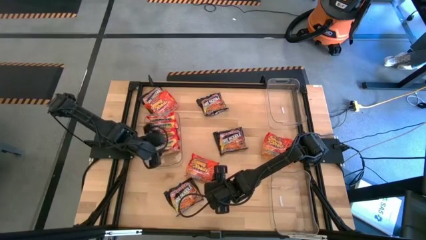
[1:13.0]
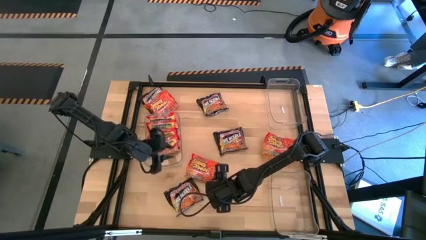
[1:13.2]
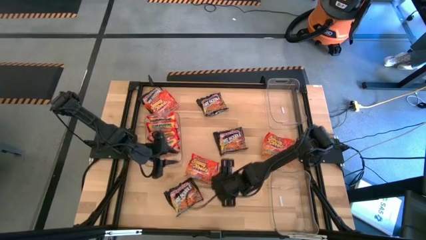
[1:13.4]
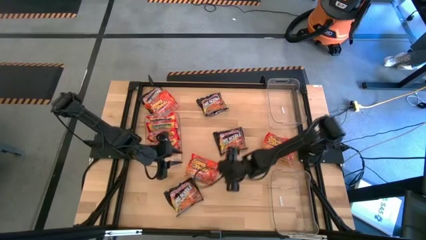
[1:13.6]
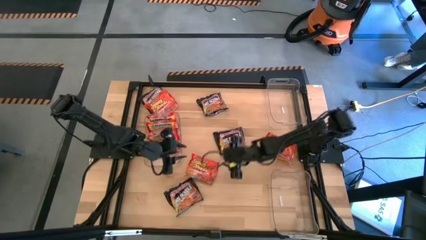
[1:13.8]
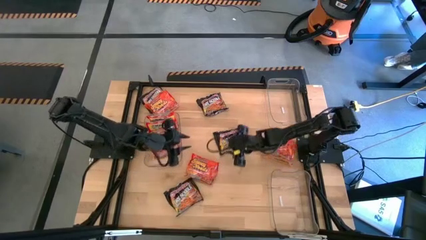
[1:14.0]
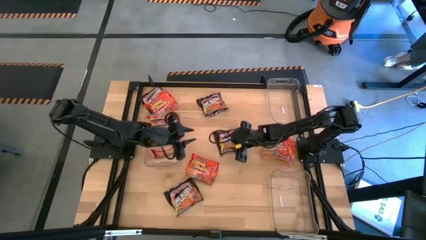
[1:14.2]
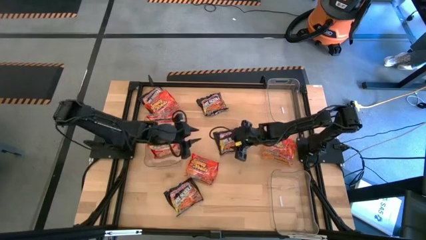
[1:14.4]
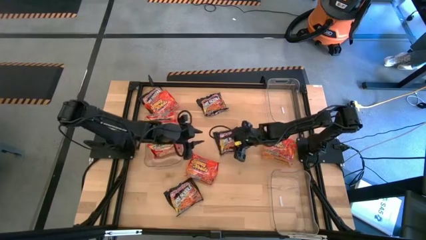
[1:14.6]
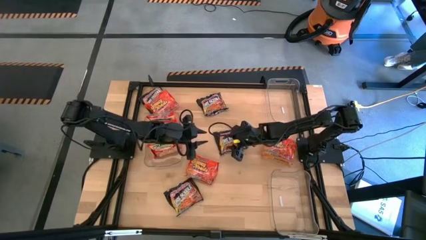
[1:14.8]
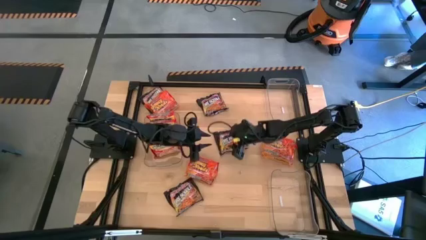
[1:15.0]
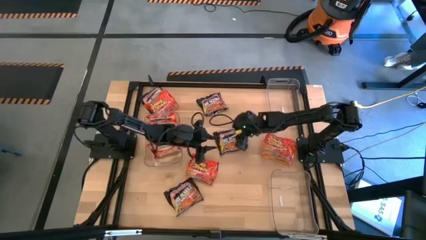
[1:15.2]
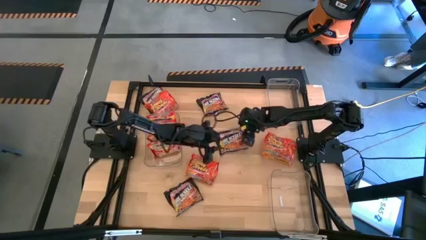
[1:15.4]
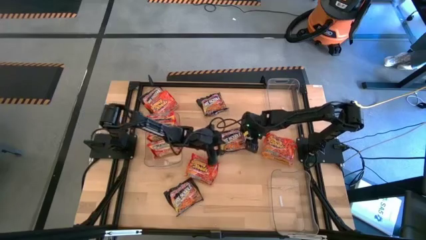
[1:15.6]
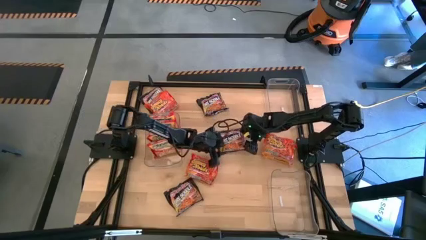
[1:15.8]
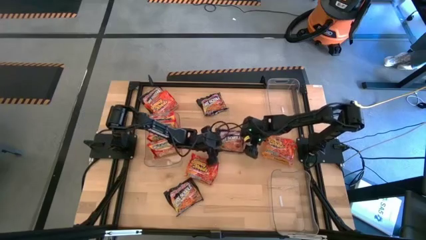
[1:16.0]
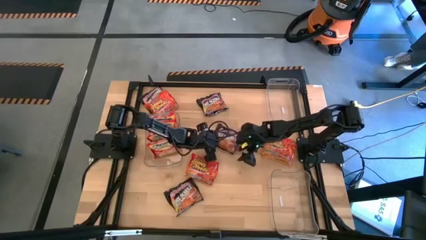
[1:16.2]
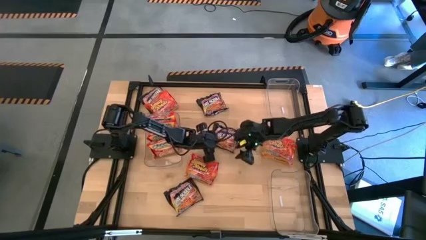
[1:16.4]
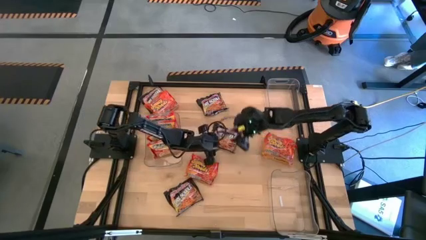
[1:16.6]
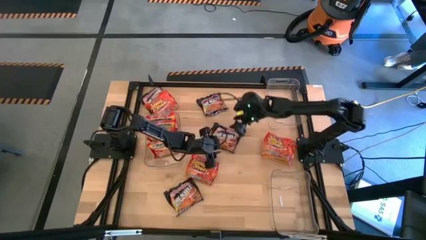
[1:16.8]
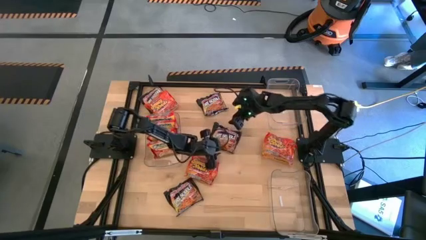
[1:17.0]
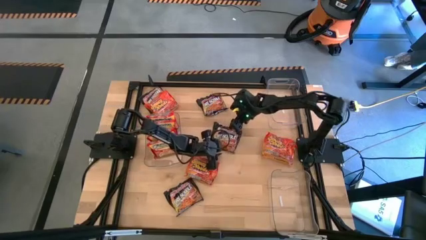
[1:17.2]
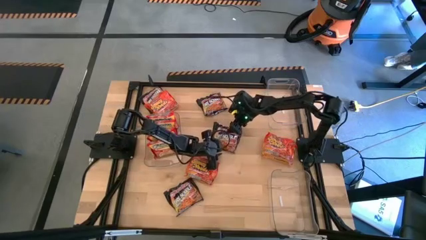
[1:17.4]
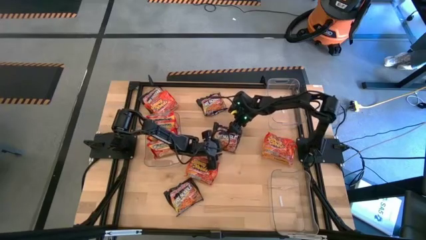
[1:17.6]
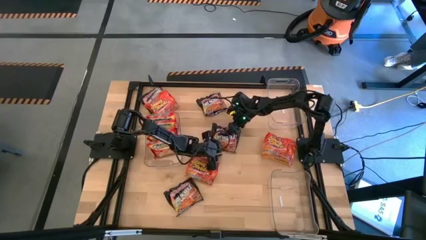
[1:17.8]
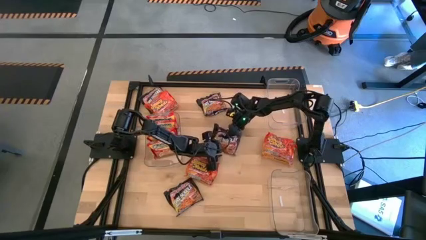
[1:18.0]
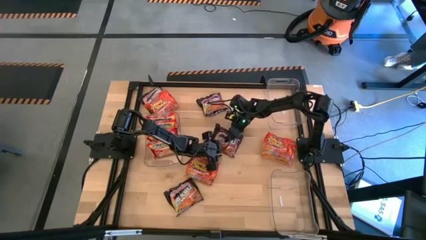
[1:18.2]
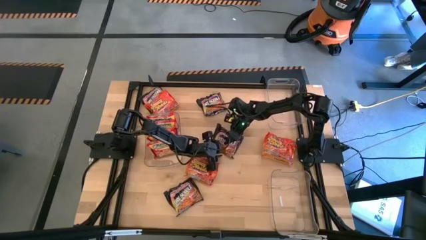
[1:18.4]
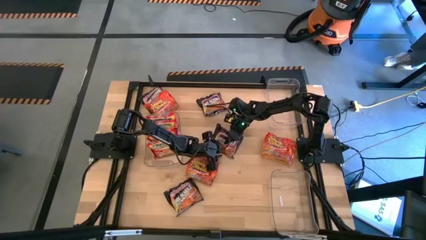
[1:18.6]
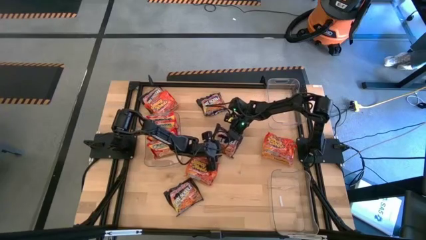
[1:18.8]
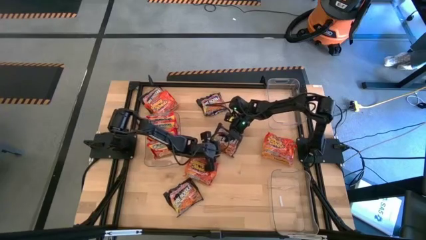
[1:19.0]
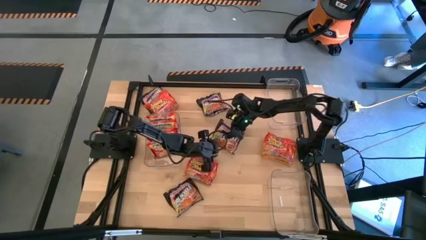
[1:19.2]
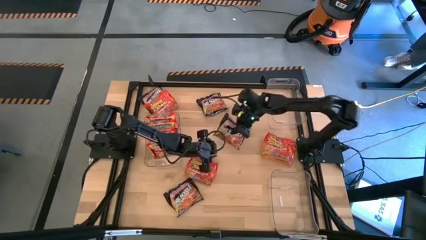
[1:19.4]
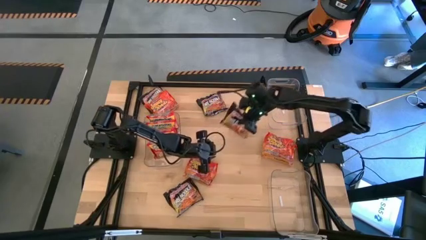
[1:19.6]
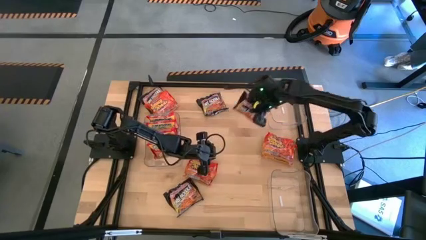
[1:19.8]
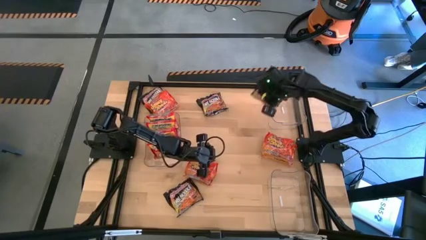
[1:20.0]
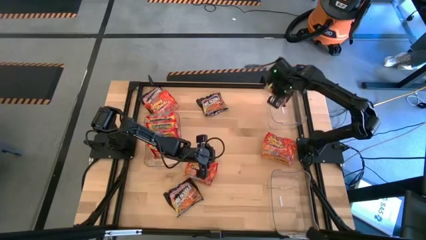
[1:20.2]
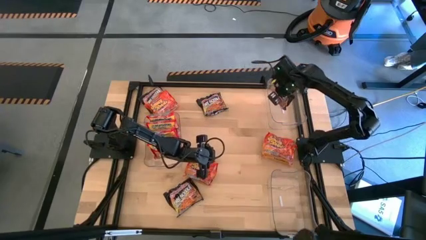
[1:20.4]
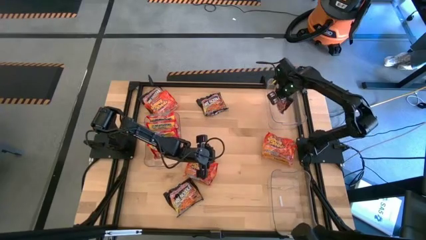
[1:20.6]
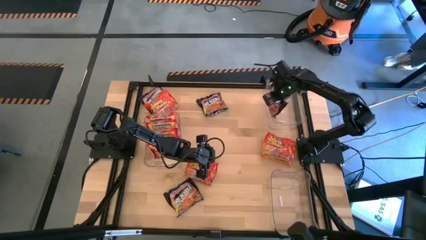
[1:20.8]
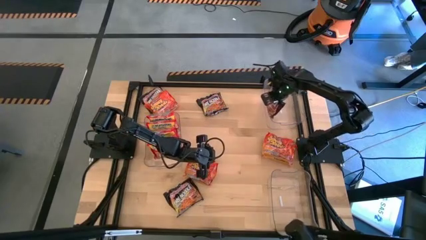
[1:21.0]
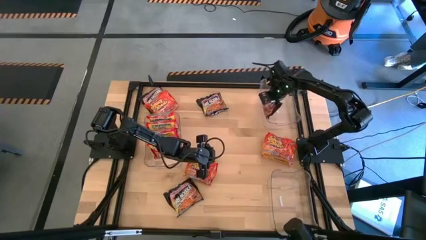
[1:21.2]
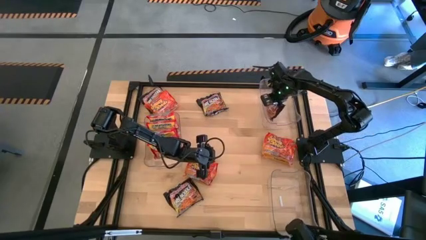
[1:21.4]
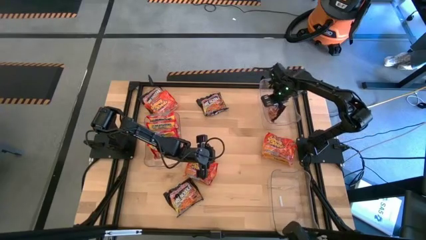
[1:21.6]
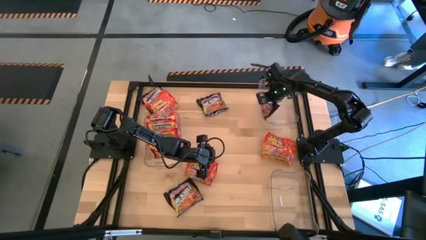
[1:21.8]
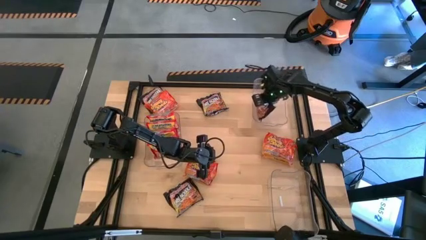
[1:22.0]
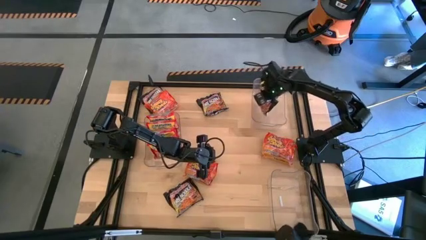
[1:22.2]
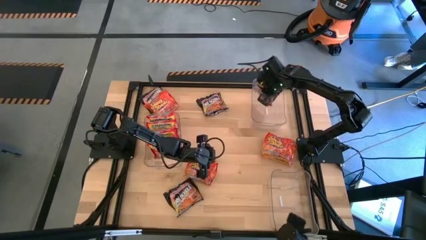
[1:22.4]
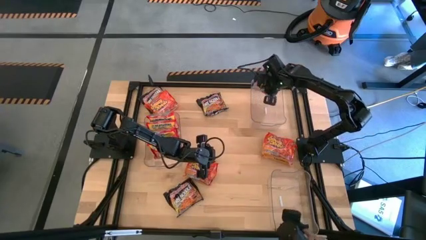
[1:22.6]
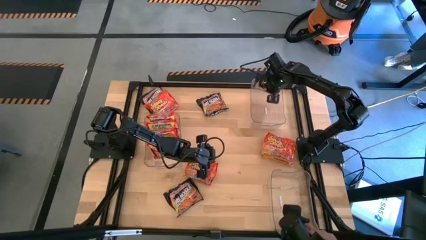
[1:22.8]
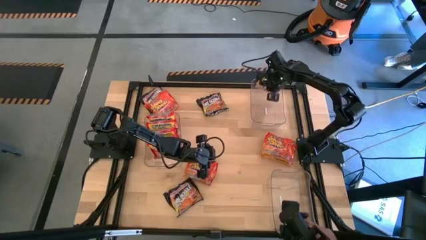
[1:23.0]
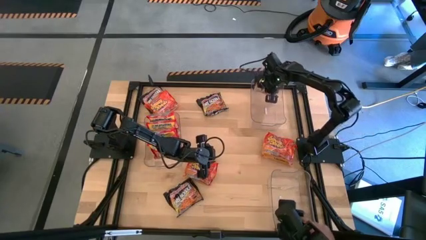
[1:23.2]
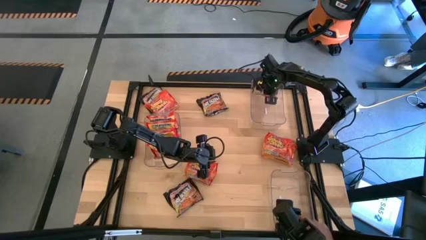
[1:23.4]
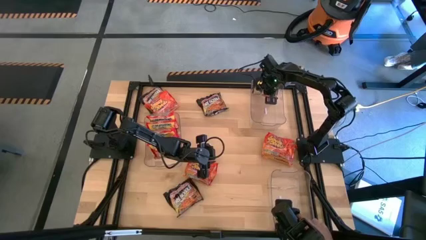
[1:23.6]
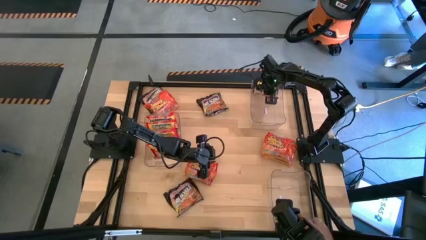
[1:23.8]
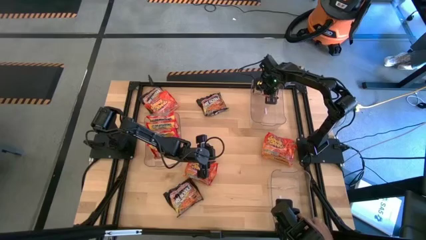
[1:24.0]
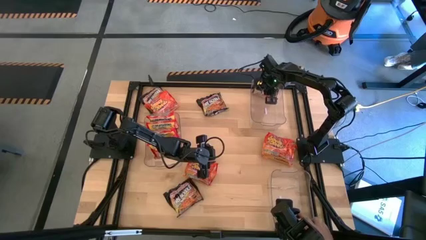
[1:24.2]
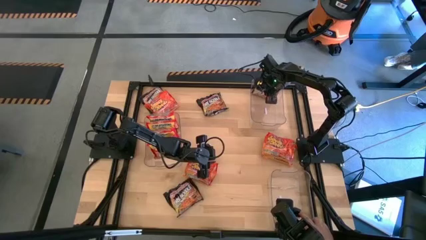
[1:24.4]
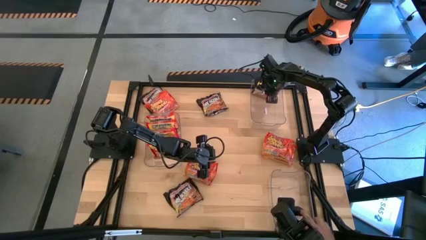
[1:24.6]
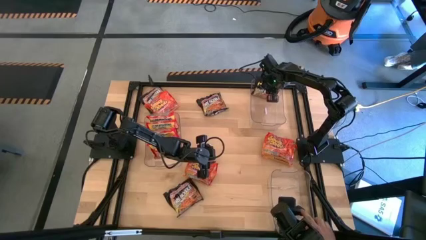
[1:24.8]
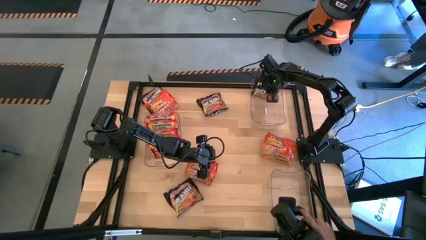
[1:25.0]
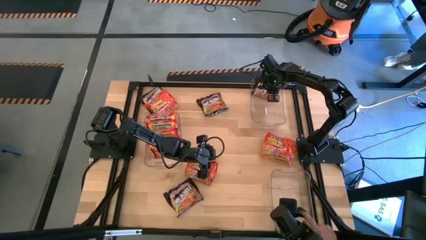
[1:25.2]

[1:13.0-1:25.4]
Task: Sort Maruchan noodles
Put the black noodle pack into the top transparent bin

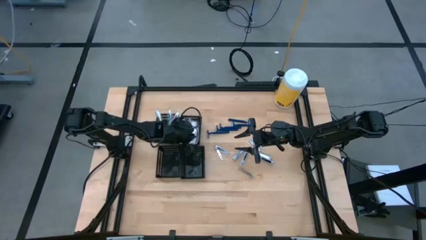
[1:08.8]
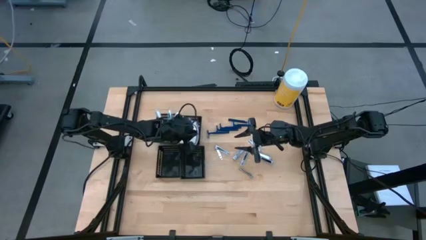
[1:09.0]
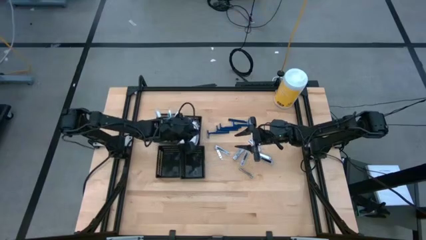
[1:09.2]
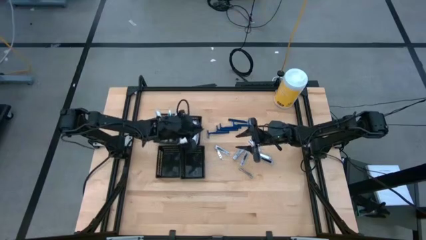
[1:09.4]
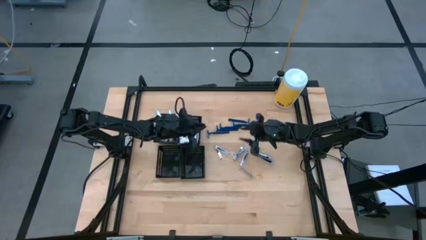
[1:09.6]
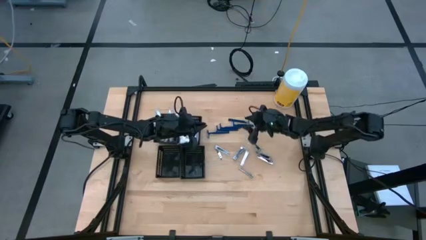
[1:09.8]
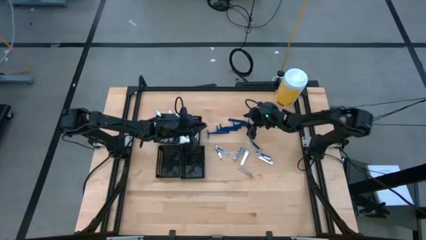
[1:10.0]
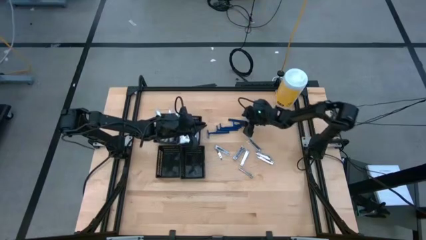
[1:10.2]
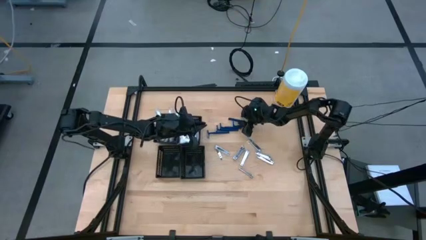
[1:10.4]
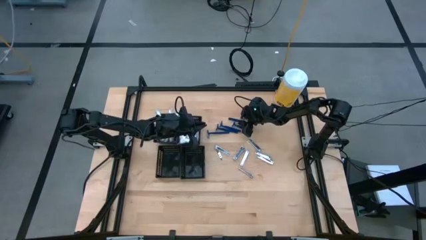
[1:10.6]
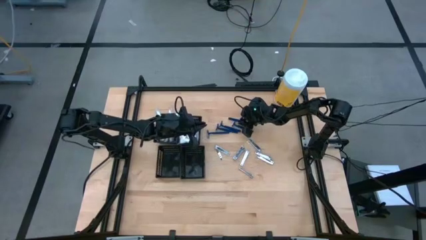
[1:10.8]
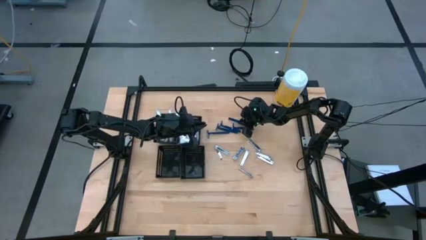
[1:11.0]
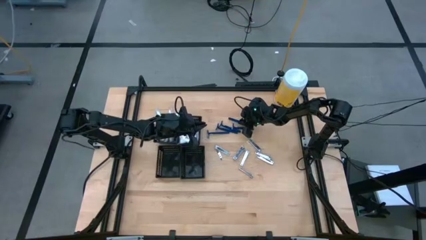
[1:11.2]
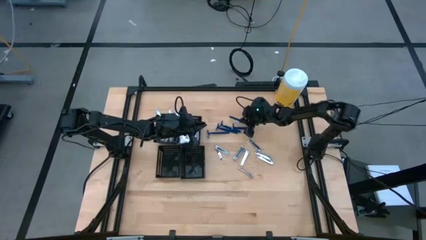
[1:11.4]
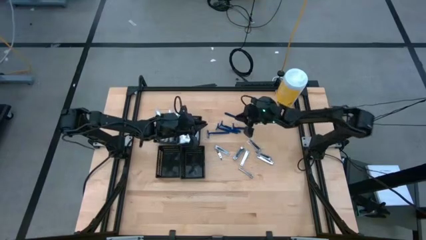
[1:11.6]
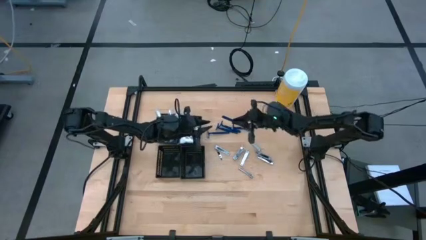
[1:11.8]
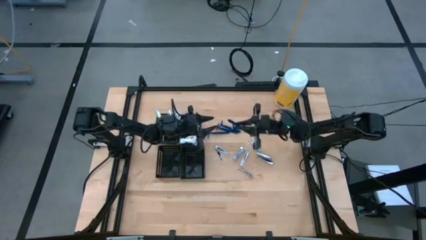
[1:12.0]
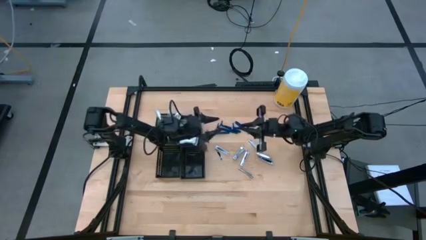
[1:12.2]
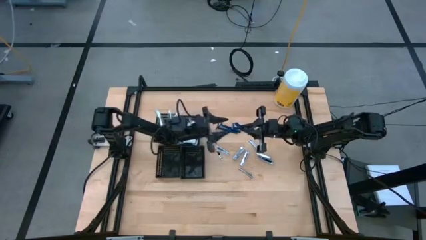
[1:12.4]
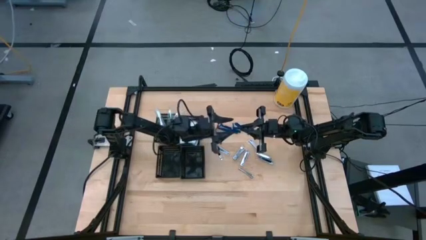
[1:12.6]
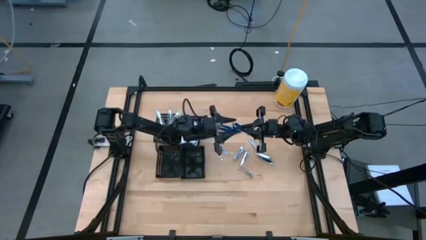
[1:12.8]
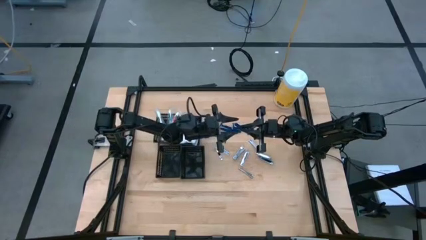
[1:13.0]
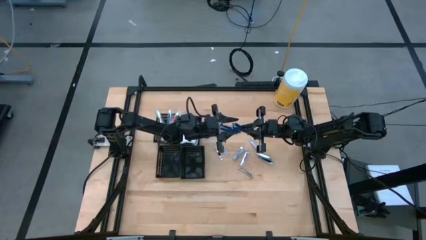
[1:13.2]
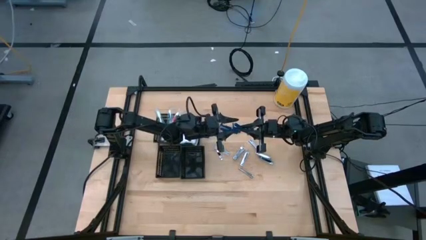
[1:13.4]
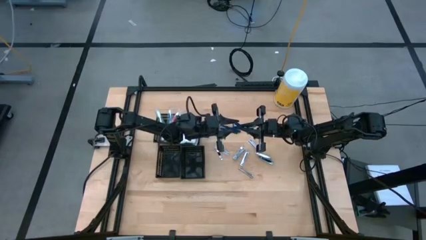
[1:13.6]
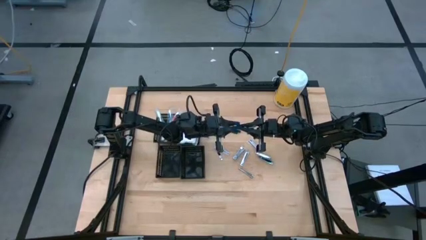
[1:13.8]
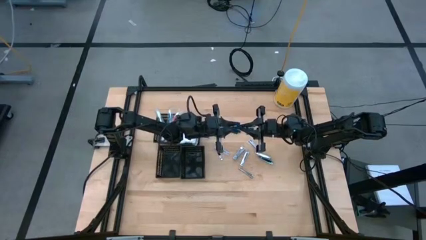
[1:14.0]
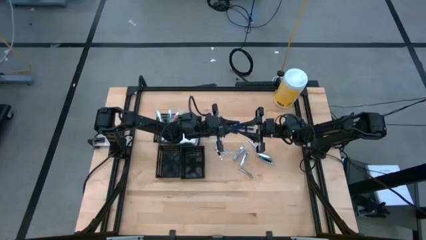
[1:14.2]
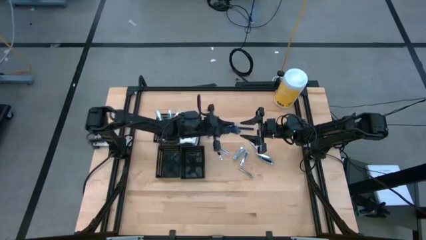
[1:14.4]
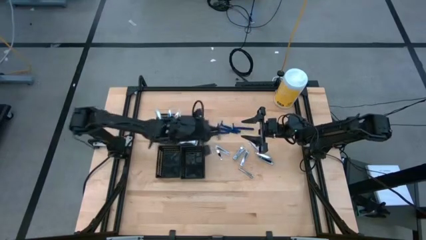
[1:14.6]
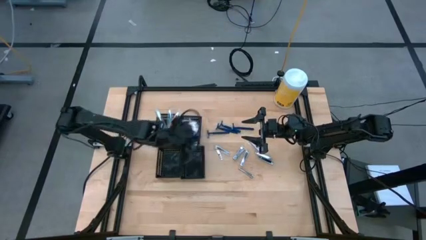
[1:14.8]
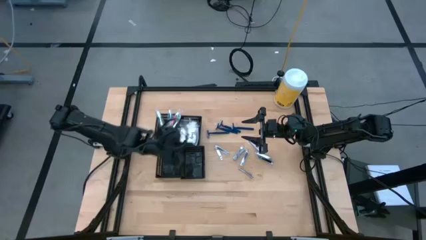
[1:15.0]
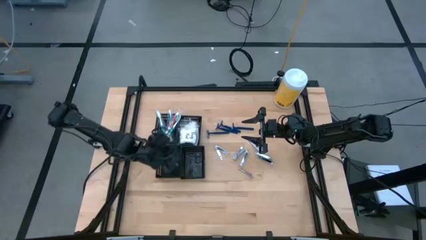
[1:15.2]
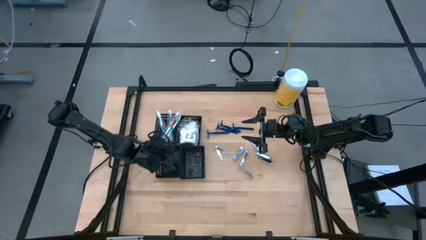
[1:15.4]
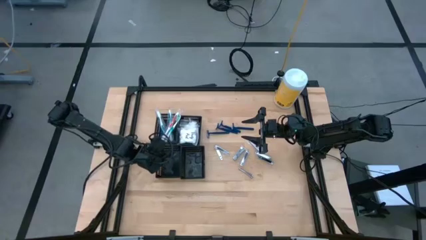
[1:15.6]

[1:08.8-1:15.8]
Task: Pick & Place Travel size toiletries
Put the blue razor into the bottom left black bin
